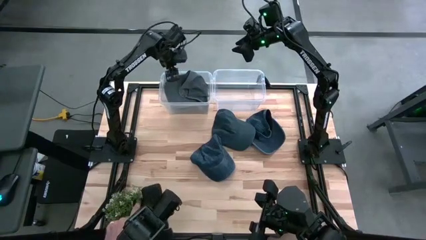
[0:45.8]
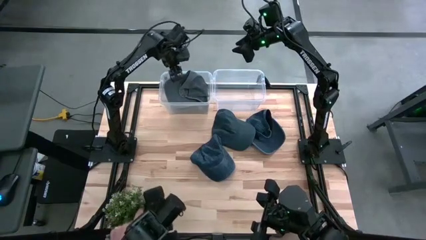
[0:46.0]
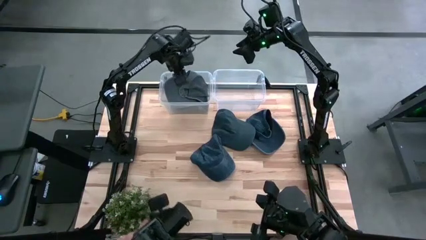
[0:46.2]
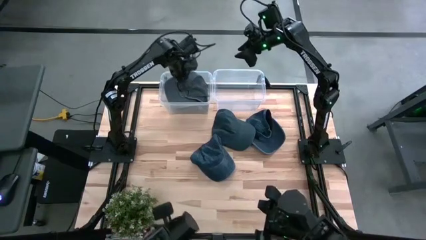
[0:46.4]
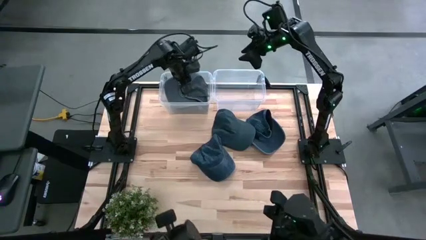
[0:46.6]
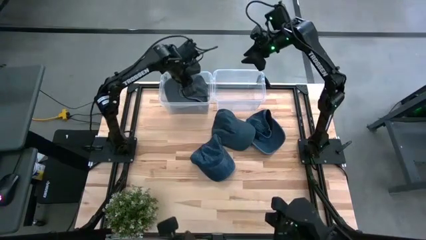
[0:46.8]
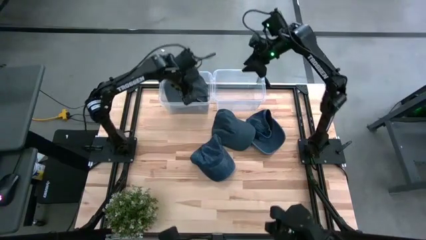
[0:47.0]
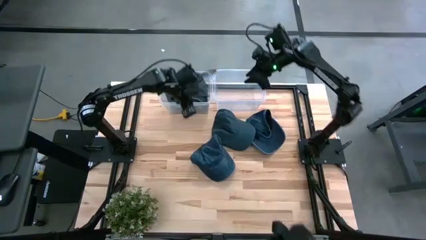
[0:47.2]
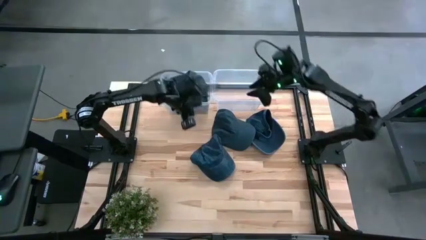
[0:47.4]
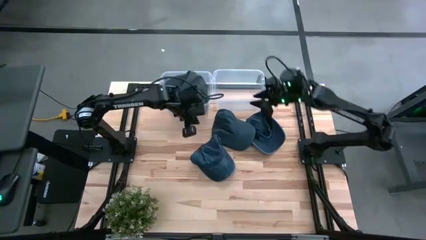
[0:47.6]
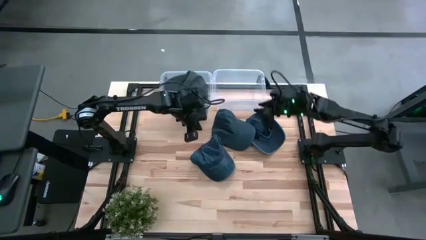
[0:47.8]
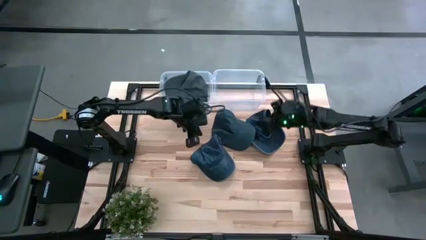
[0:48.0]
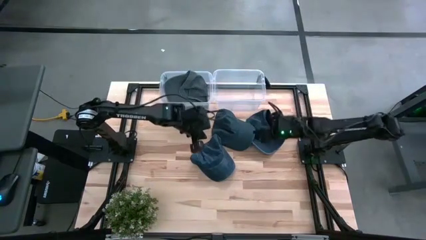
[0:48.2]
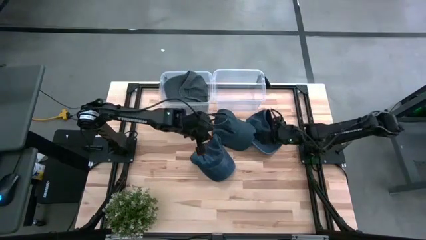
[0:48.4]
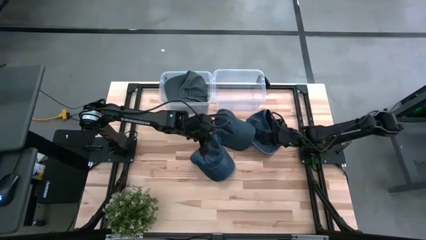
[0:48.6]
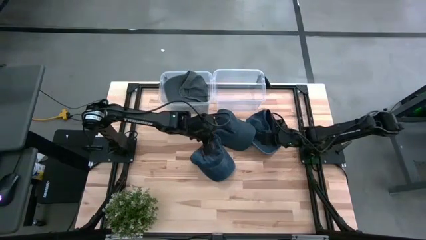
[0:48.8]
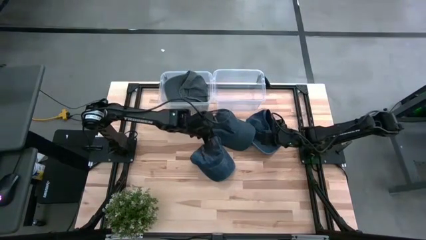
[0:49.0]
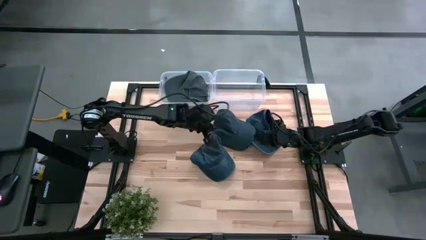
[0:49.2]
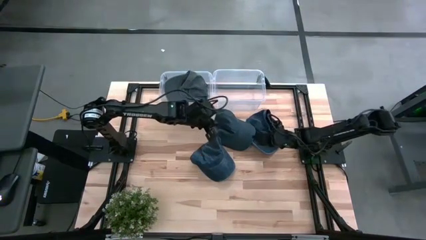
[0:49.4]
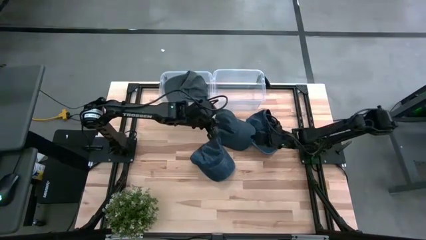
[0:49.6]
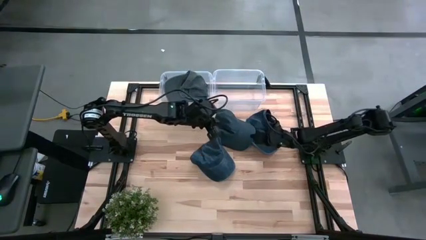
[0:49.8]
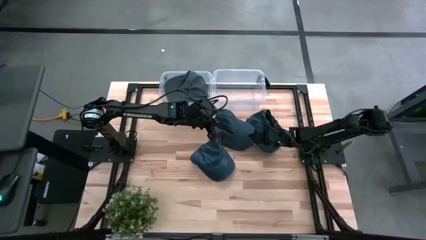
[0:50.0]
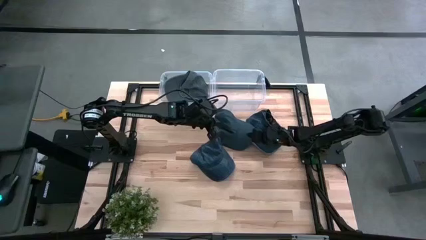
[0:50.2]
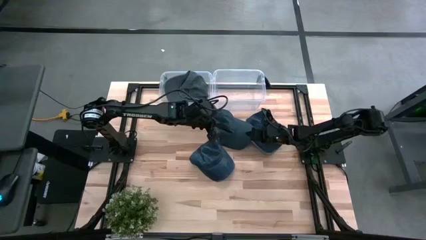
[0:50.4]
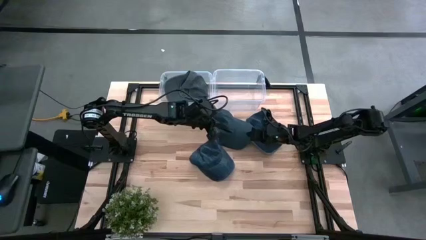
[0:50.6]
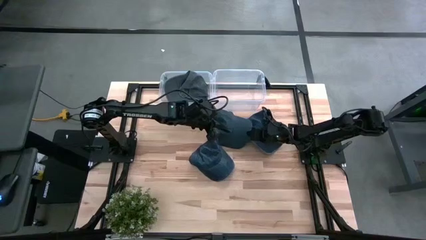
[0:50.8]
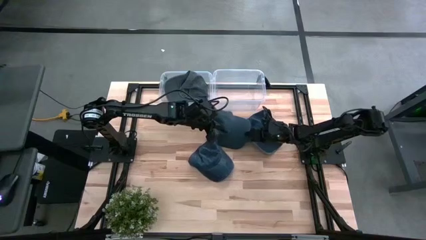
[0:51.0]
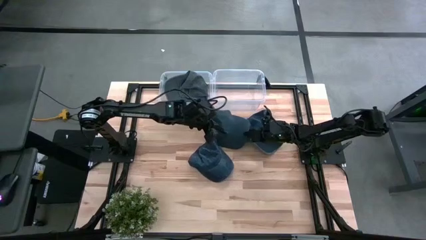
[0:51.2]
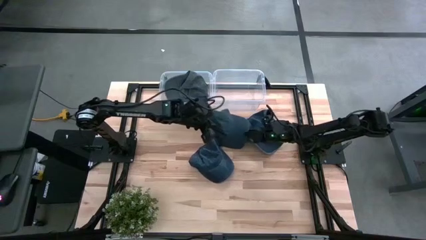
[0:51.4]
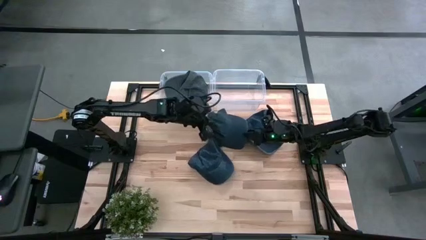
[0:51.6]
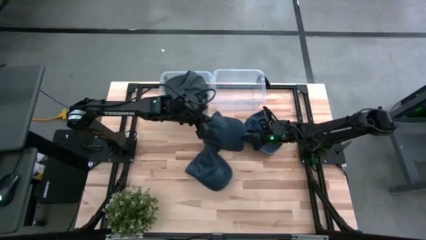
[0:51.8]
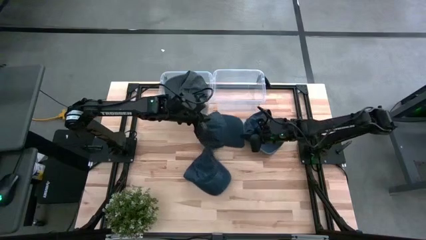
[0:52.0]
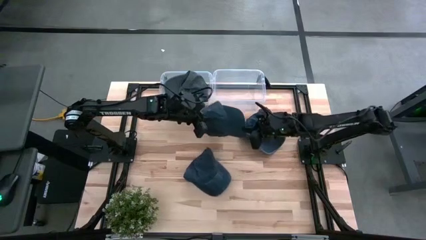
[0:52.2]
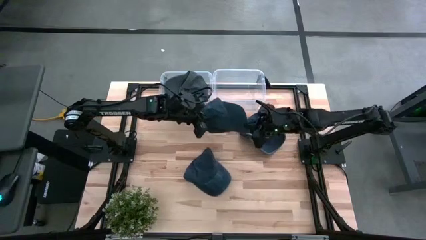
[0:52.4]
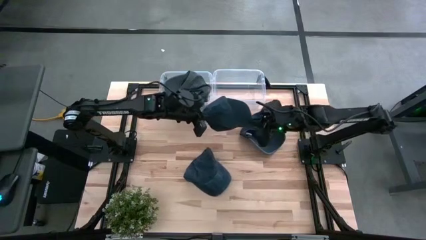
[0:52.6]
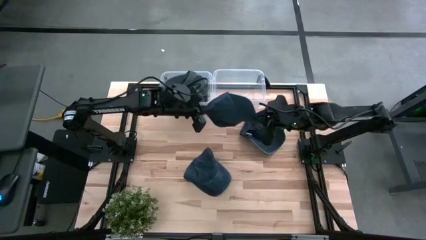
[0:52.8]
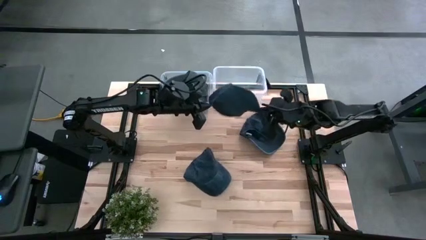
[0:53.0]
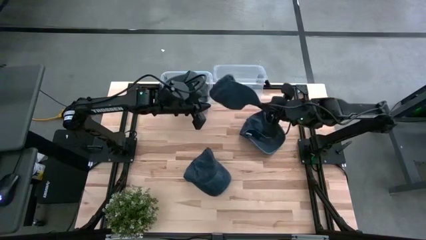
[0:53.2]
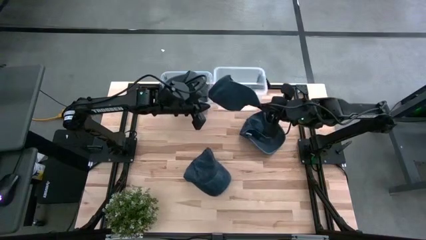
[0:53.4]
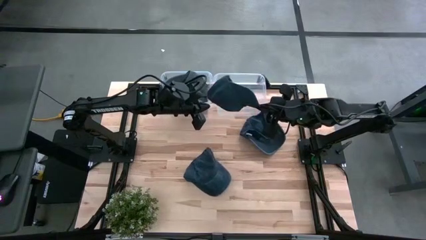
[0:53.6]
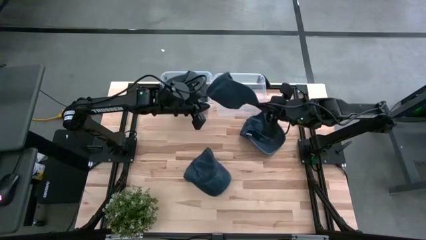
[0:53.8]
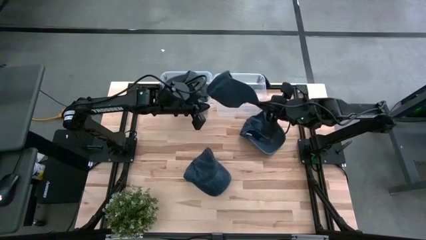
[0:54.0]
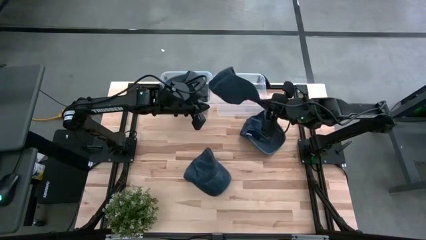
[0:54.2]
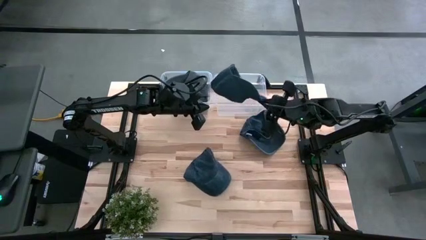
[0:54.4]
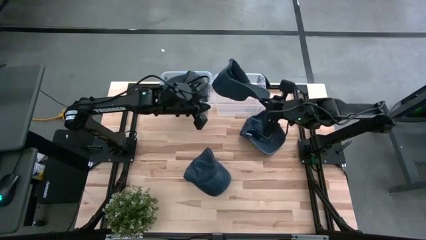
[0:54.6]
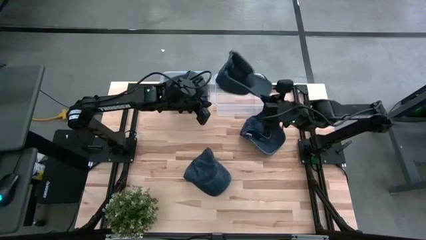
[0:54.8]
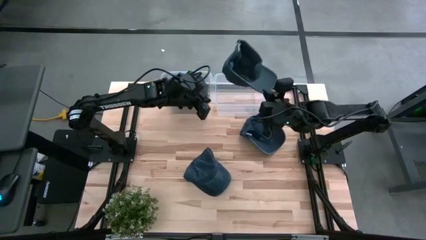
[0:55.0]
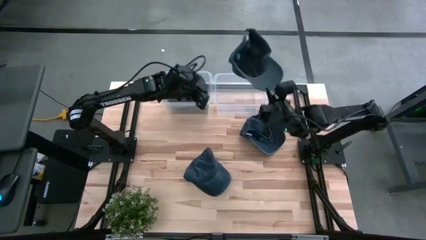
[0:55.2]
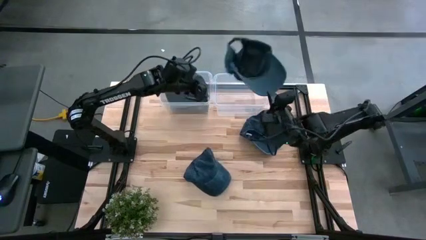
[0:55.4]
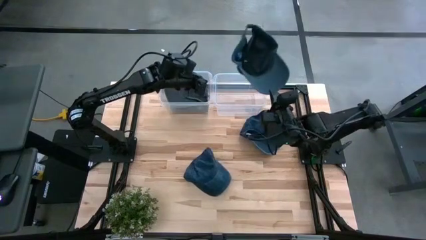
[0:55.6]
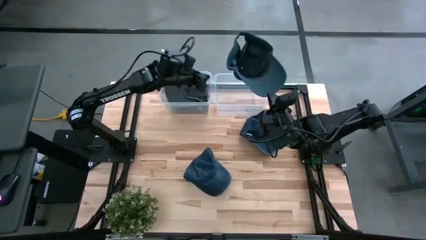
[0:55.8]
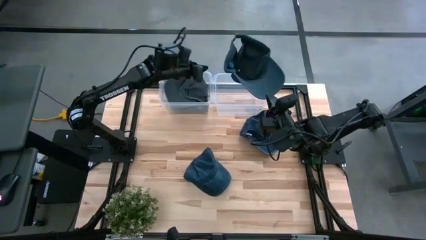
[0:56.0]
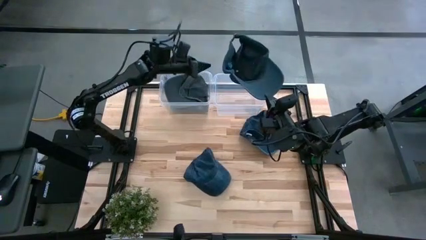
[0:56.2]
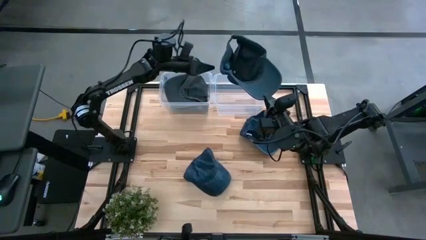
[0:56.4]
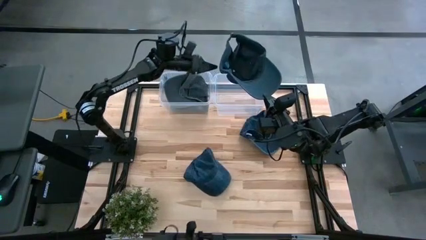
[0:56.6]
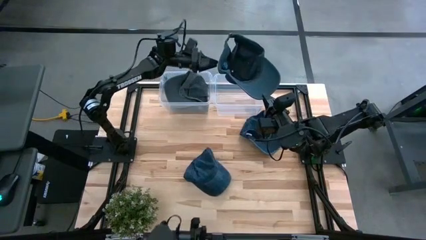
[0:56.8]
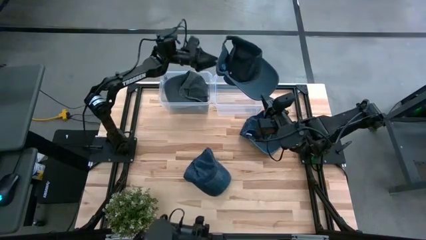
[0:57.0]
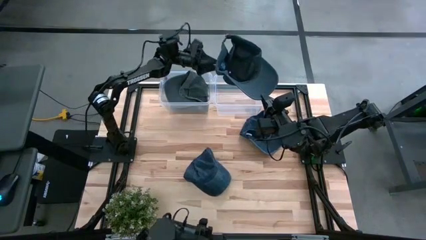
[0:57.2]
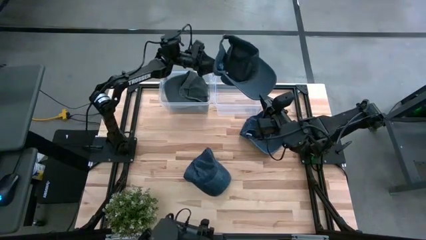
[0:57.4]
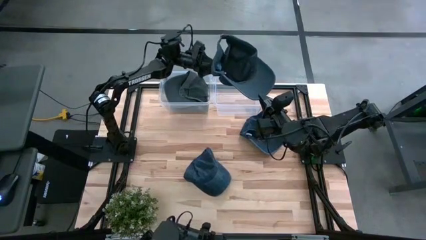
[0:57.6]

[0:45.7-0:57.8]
Task: Pick & Place hat
Put the top left blue cap into the right transparent bin

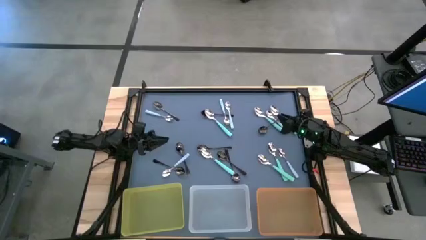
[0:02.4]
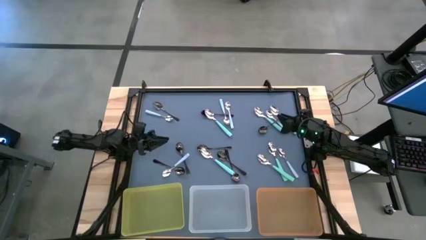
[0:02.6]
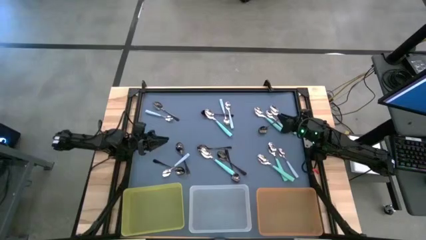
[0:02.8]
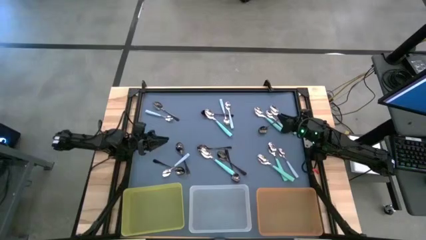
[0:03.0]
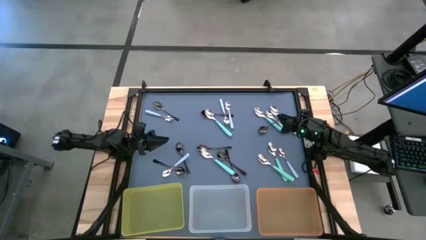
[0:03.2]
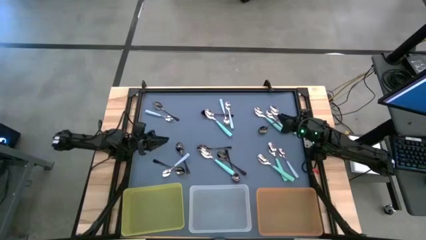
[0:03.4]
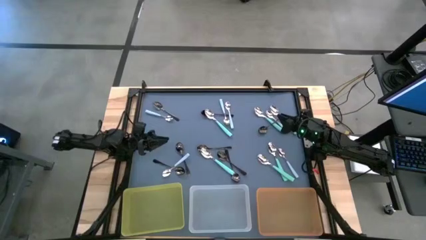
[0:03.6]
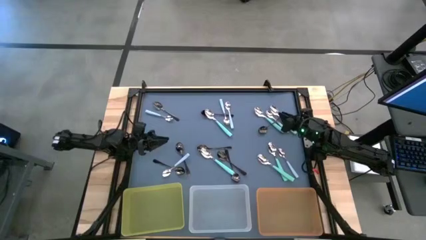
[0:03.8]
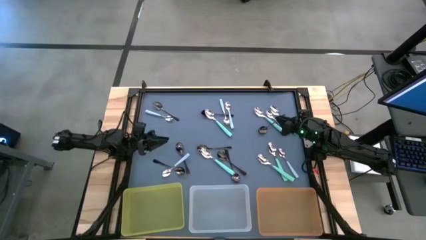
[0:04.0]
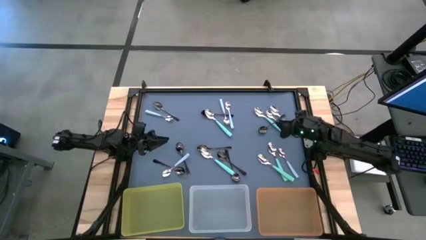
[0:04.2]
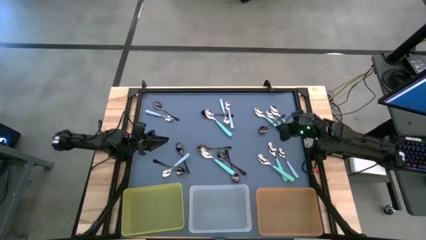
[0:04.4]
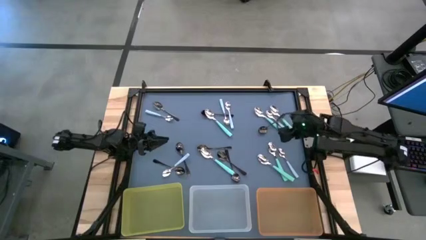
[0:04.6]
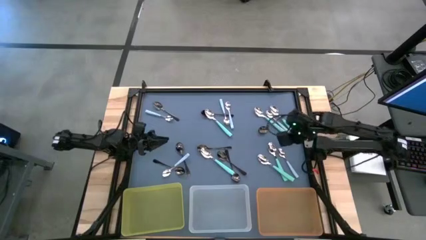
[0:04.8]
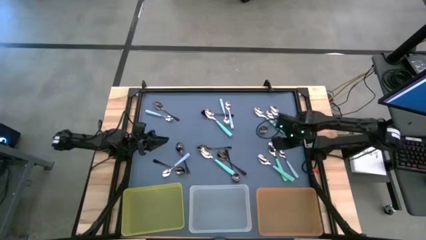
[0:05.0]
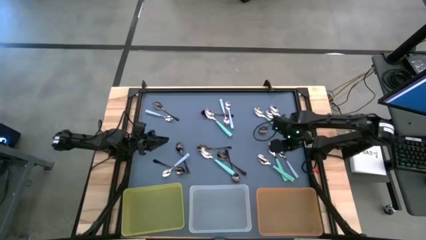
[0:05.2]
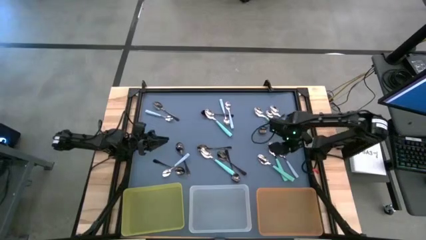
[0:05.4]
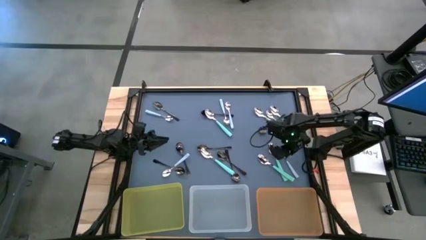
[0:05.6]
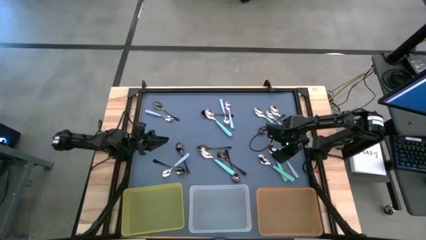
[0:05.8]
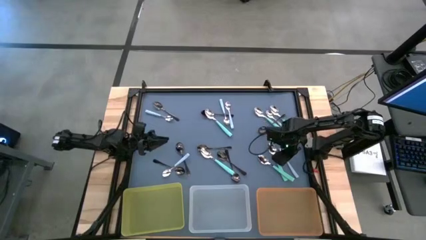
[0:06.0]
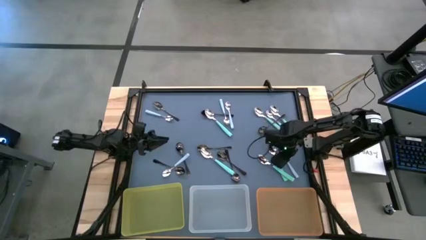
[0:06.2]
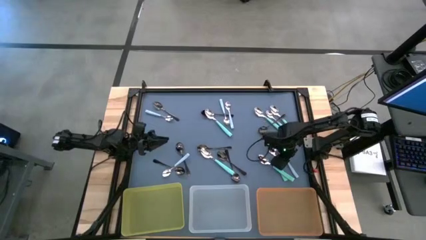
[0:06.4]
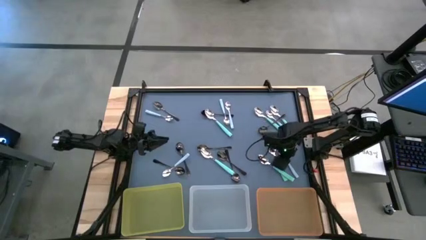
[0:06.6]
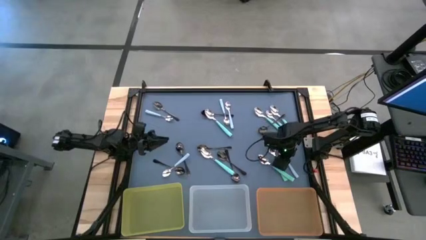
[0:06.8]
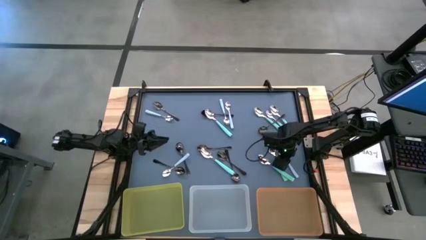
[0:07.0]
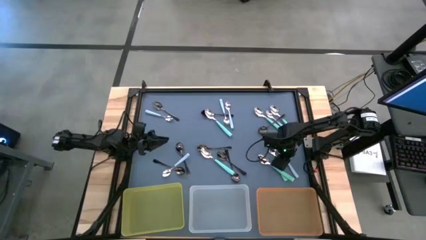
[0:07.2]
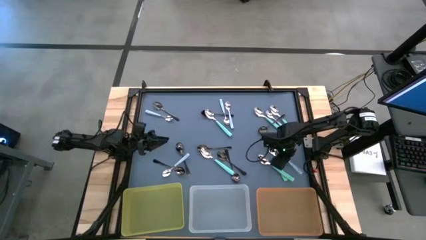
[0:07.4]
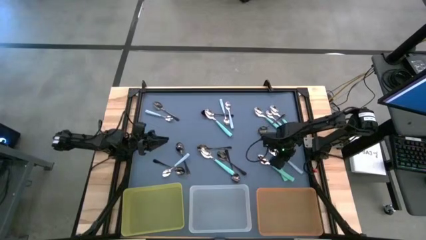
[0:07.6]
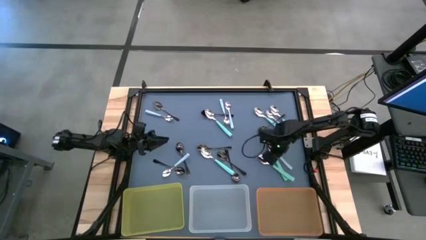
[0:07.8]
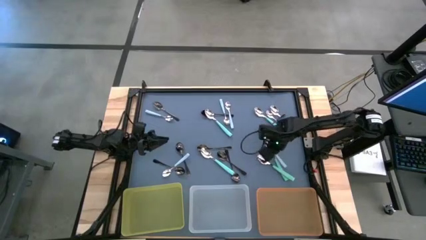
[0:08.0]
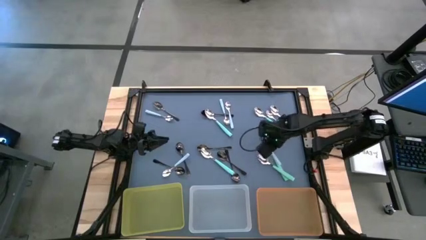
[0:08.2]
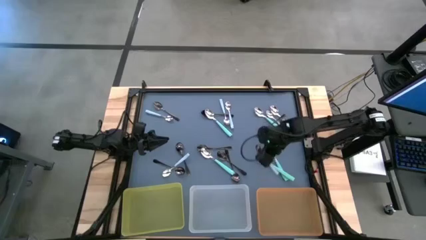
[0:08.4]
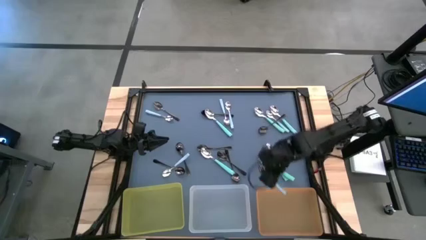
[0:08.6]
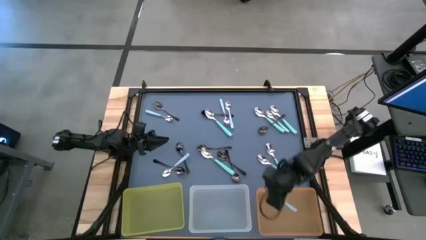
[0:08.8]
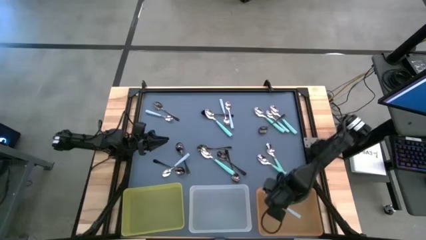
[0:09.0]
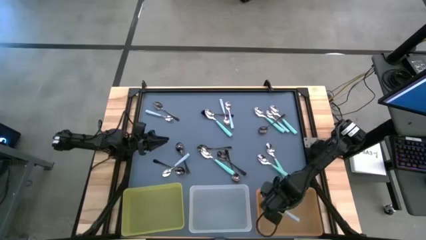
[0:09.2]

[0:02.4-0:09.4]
Task: Sort silverware by color (type)
Put the blue spoon into the orange bin
